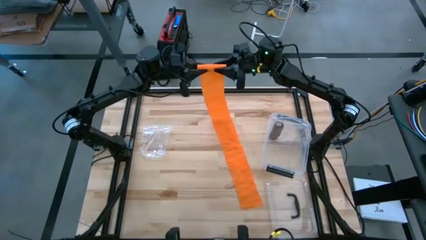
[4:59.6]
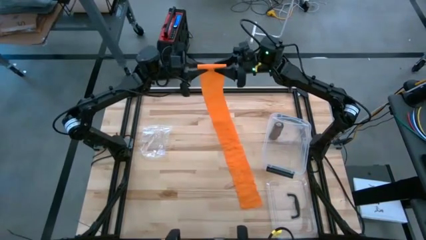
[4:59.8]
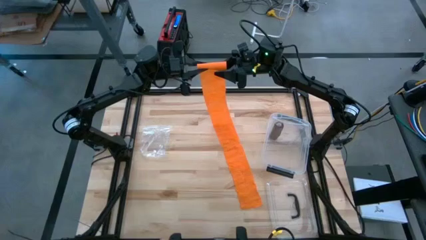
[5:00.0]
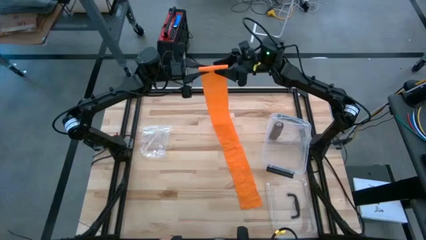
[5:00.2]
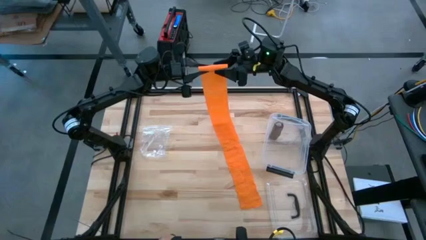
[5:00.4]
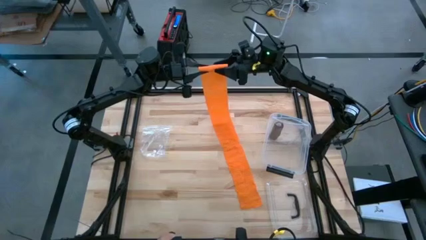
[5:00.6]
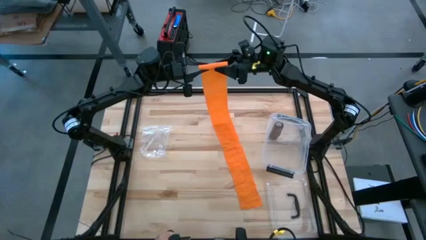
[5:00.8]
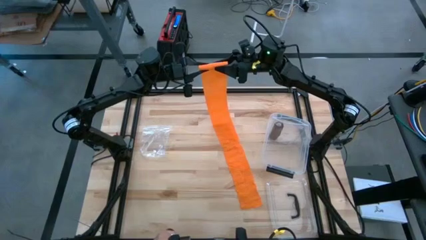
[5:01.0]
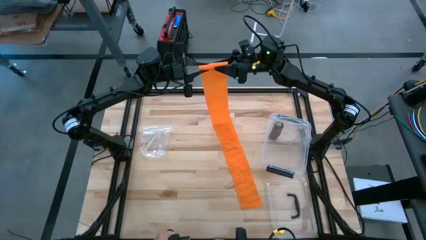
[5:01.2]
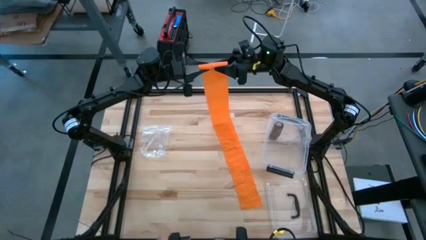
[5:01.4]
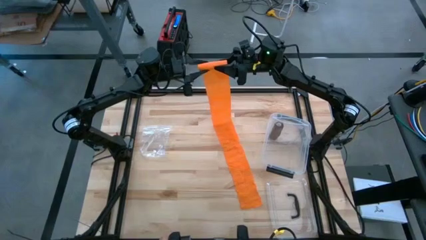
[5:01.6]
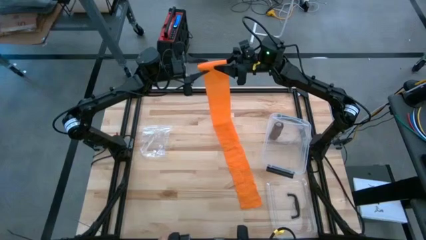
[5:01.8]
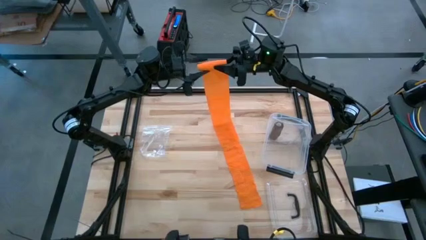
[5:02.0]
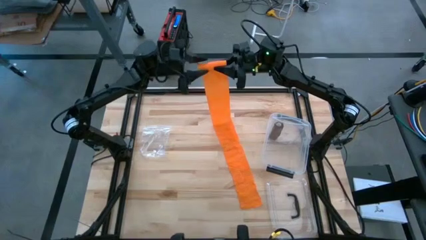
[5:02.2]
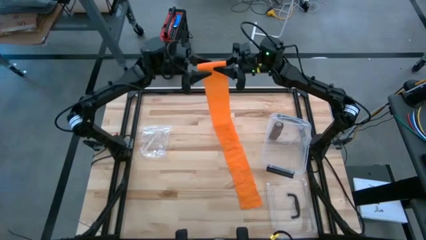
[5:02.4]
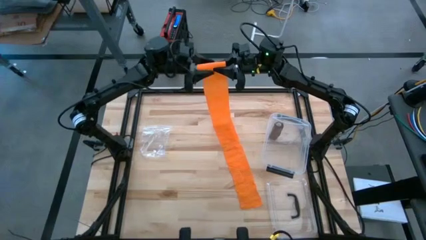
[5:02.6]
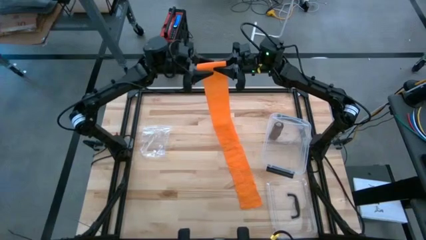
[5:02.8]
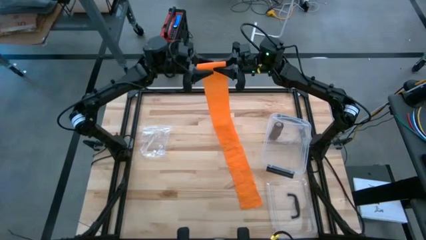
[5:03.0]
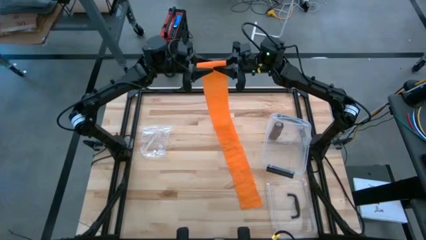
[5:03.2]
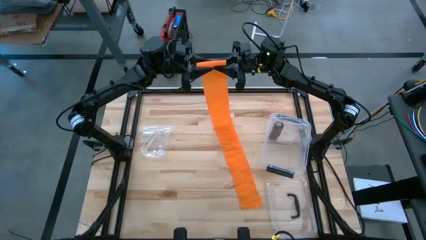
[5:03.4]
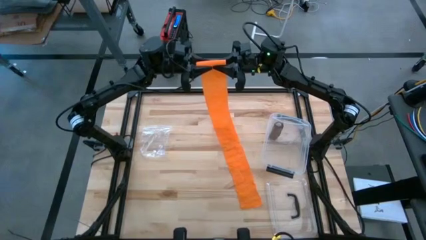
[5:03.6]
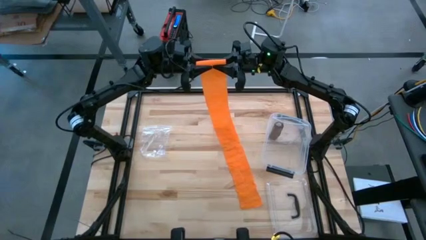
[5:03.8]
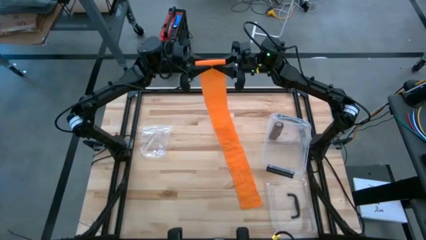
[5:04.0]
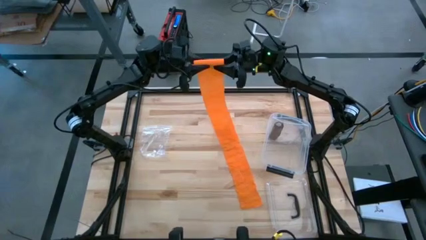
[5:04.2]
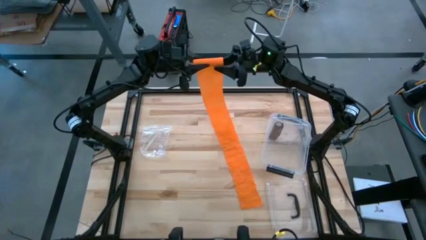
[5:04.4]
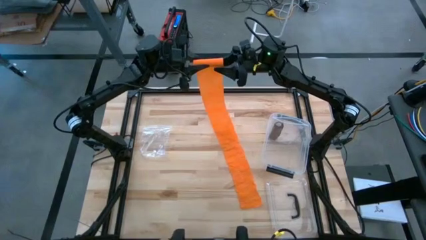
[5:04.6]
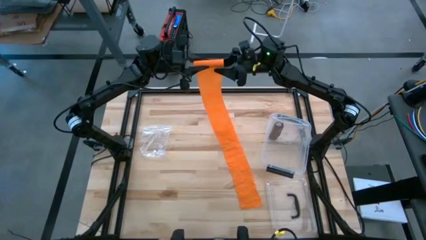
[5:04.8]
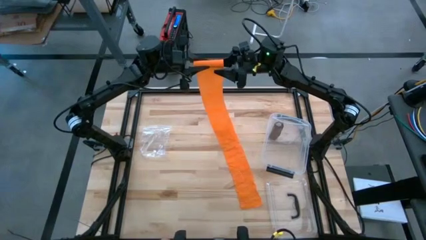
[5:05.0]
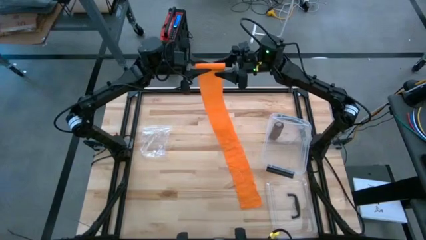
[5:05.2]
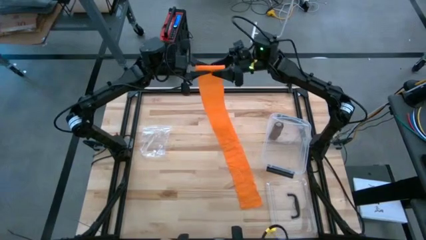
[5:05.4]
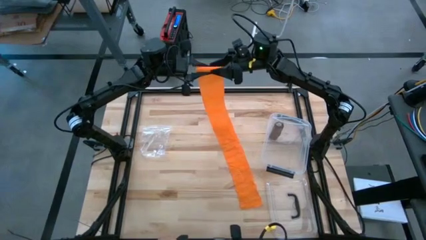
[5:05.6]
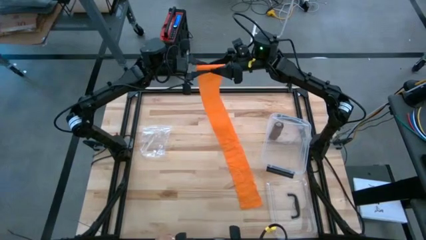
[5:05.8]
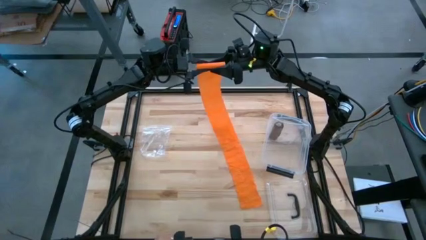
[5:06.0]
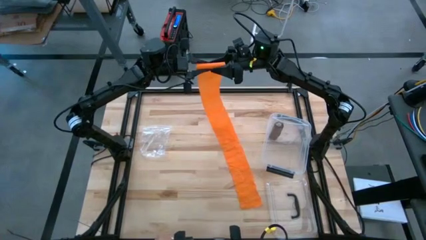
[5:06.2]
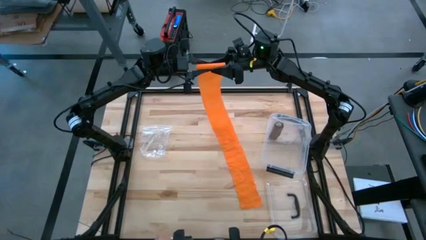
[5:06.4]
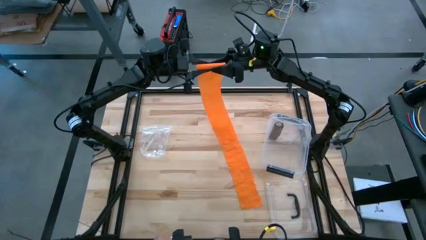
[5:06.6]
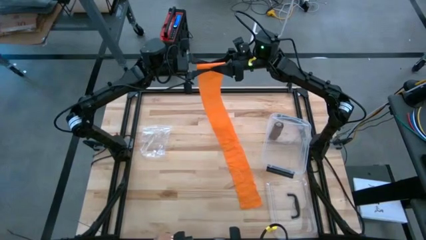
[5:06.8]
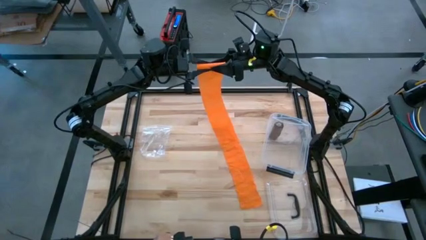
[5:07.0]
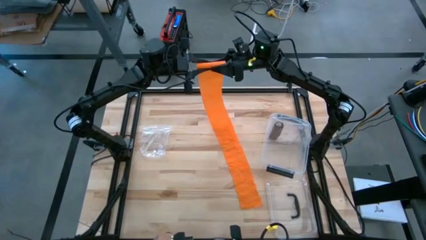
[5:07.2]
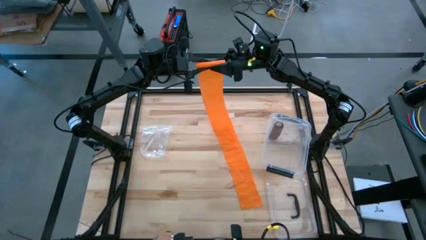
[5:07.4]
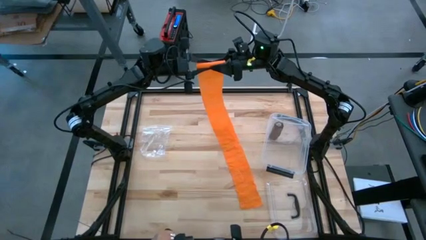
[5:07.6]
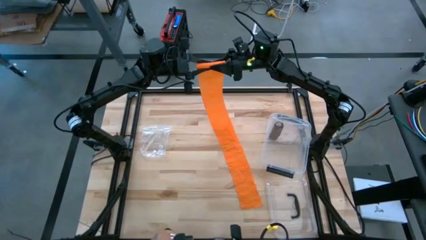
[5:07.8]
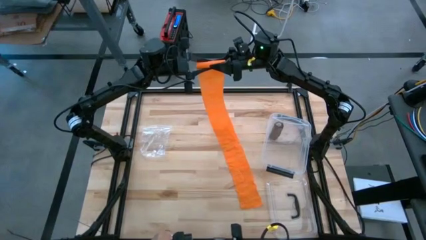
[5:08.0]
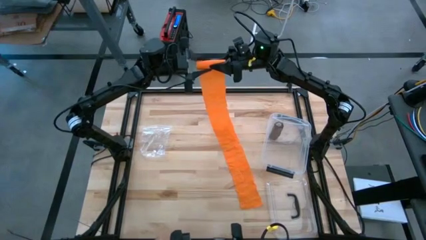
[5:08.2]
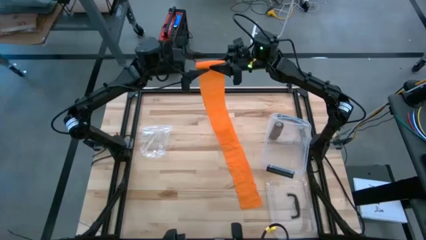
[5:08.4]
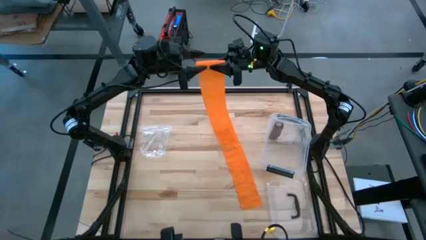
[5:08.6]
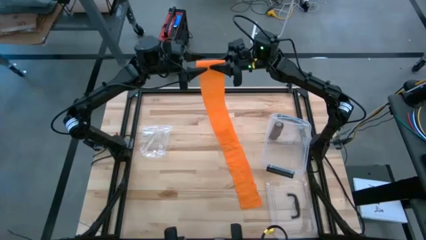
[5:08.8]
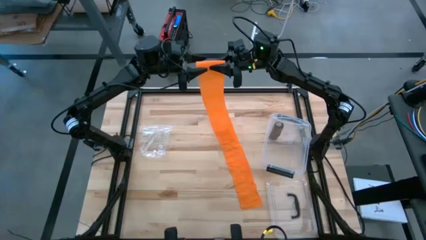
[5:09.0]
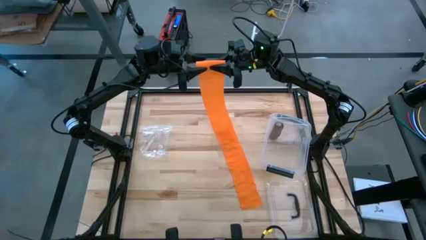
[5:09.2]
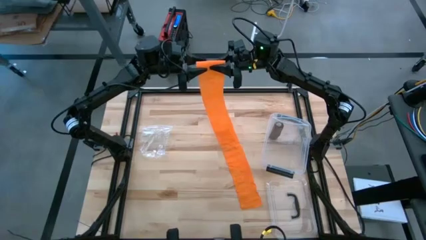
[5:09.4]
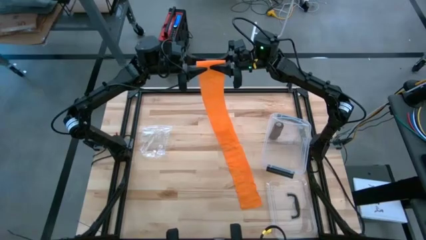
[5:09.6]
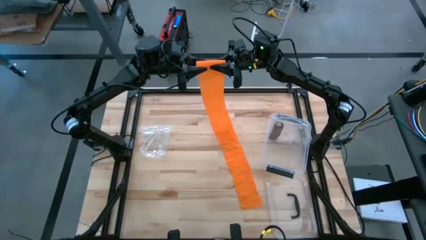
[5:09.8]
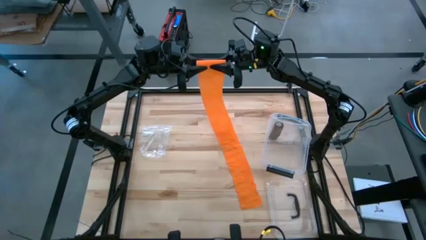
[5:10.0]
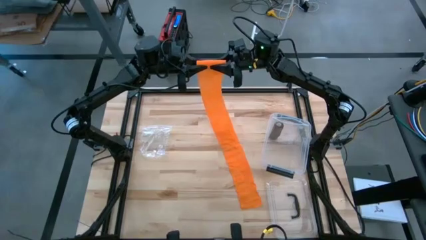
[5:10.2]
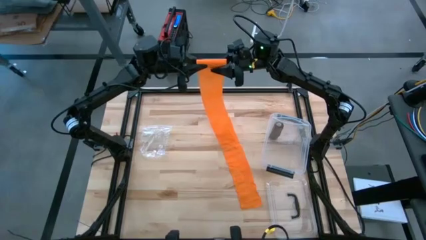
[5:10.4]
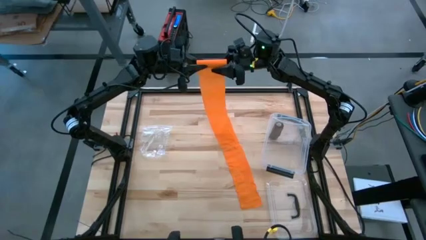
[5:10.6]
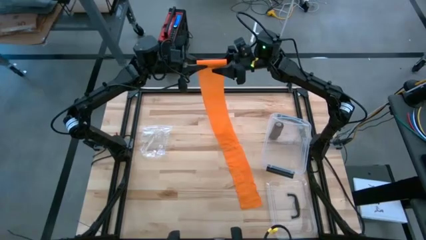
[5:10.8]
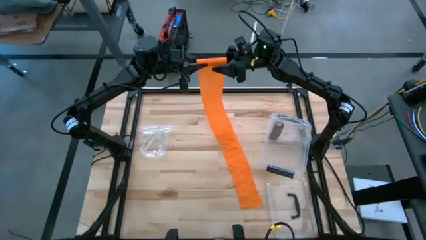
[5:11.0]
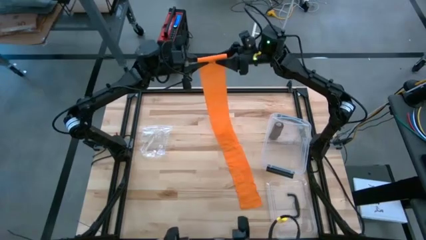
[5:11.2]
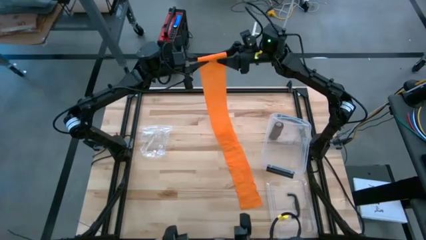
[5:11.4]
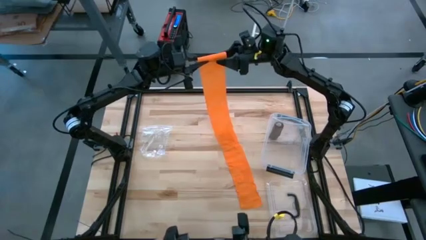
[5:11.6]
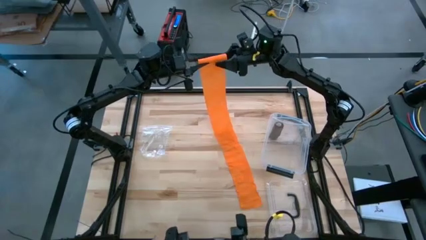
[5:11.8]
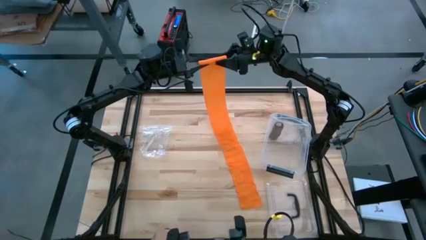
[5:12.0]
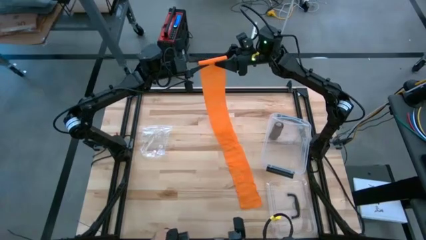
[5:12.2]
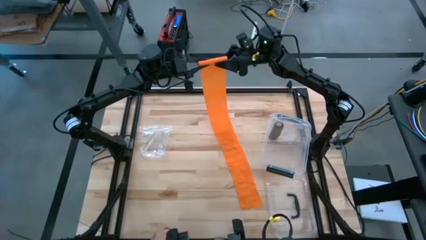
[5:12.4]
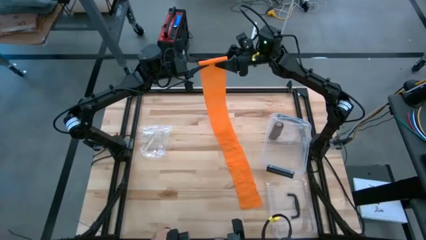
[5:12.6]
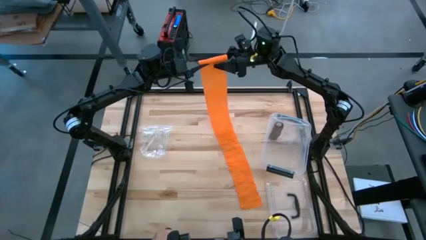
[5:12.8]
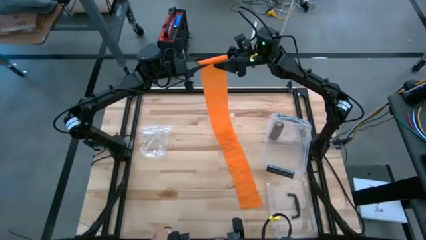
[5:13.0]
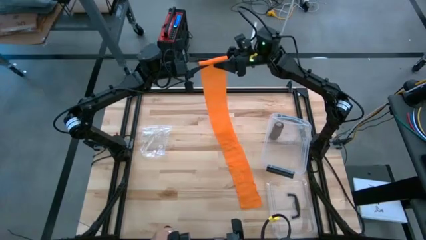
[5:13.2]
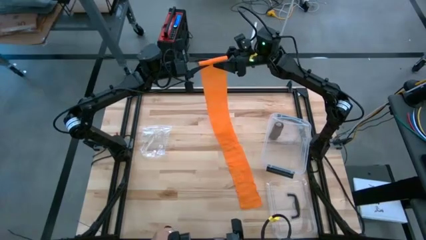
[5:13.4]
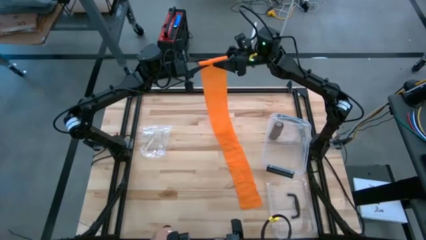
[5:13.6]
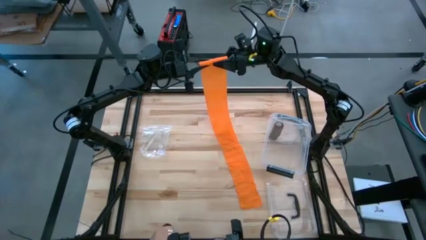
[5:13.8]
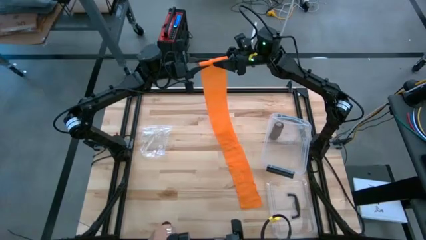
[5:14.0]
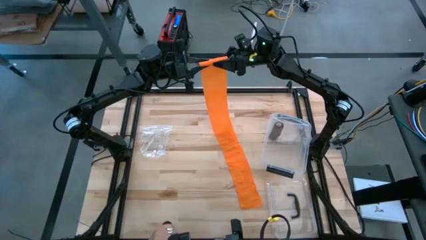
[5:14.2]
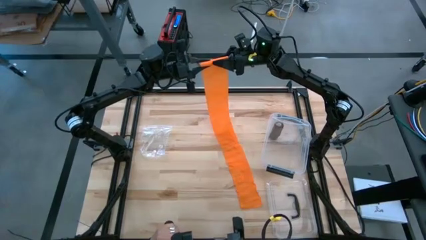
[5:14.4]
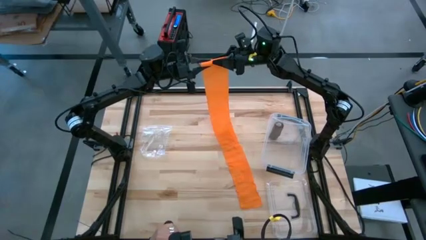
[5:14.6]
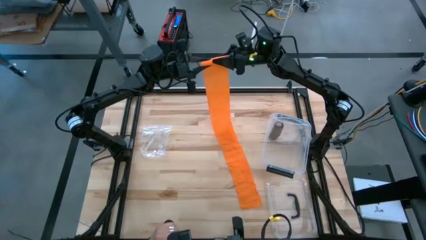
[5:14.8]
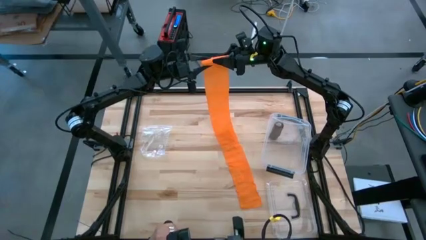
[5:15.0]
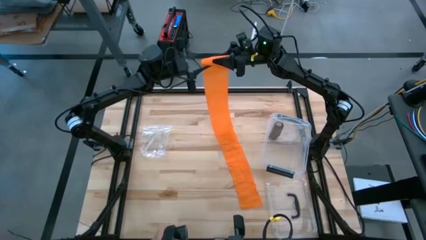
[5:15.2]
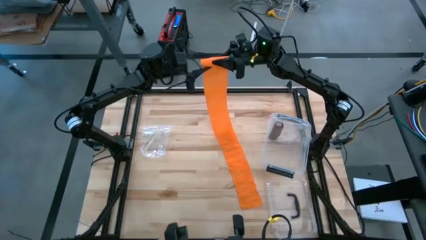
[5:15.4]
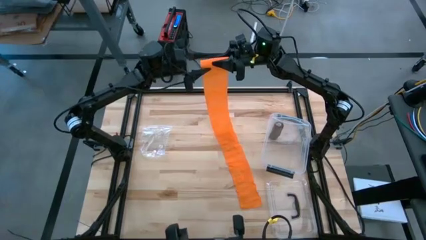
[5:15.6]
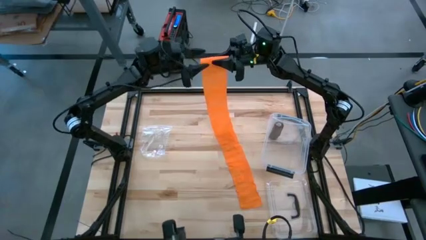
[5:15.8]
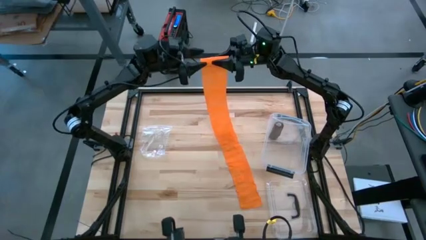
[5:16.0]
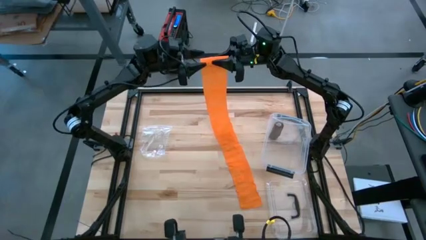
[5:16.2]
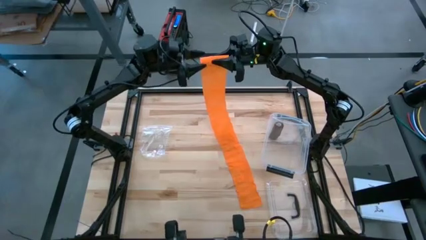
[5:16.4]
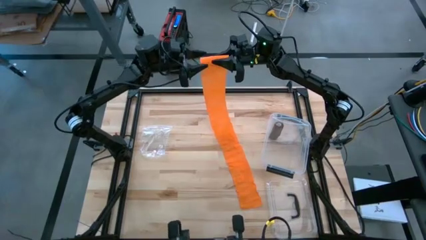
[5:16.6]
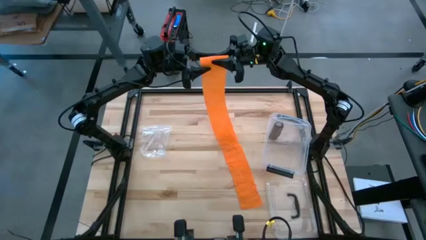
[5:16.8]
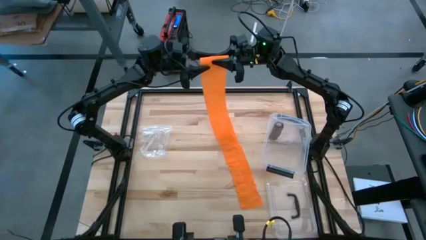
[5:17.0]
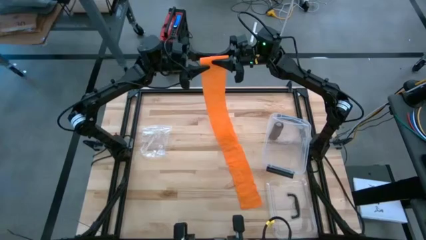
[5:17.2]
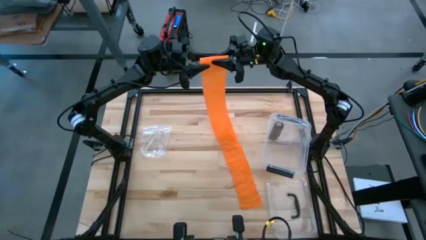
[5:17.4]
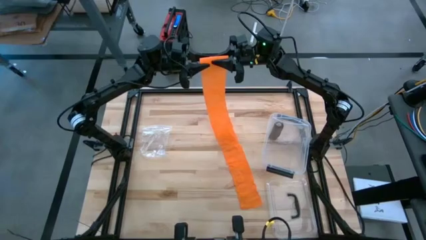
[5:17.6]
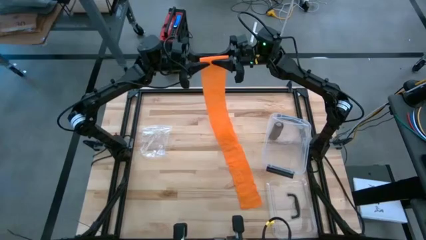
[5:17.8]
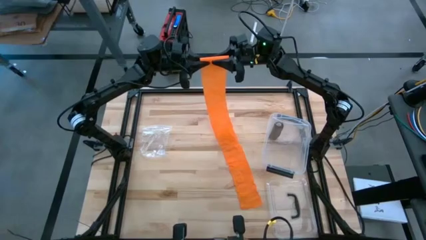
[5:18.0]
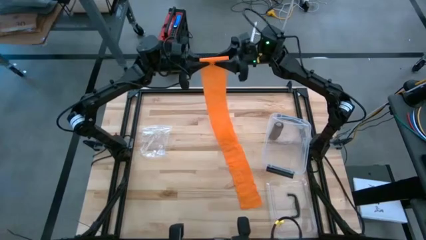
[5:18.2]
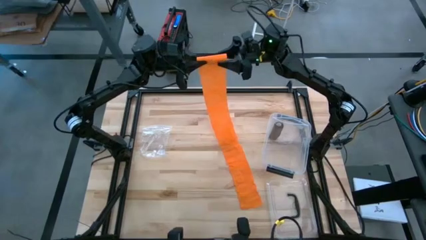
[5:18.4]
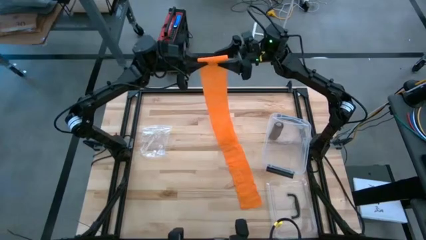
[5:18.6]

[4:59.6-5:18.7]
Task: Roll bandage
Roll the orange bandage
